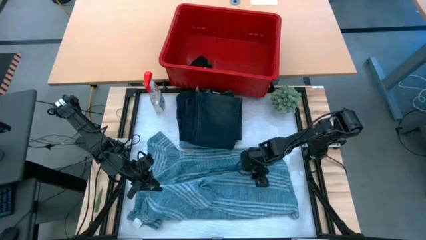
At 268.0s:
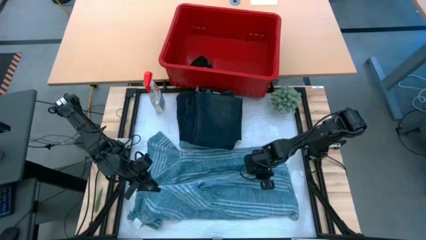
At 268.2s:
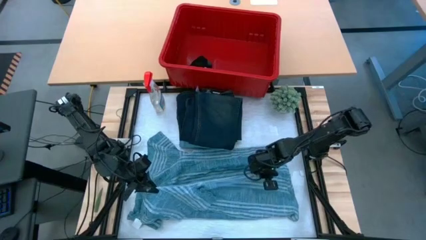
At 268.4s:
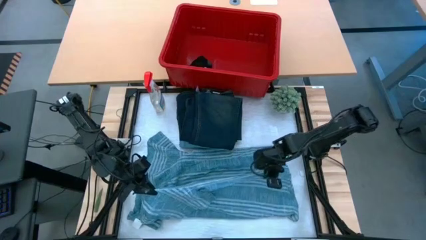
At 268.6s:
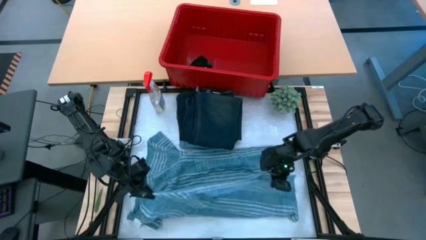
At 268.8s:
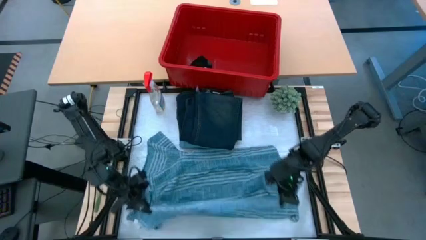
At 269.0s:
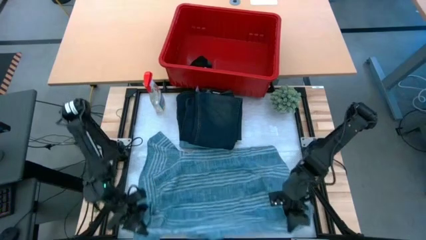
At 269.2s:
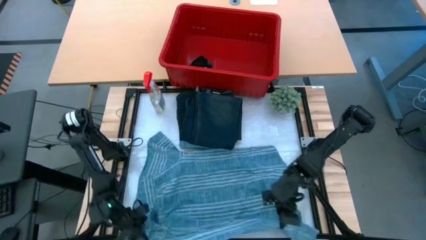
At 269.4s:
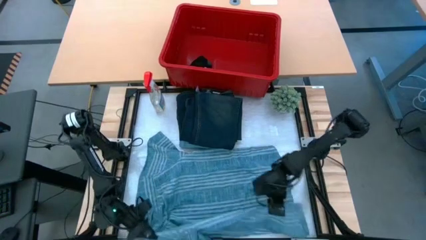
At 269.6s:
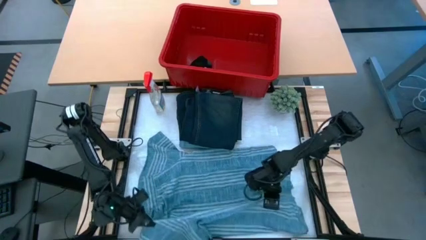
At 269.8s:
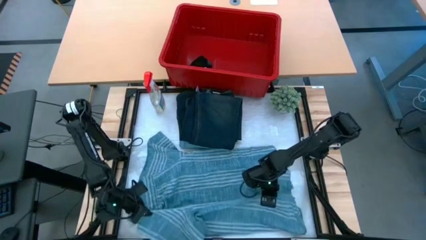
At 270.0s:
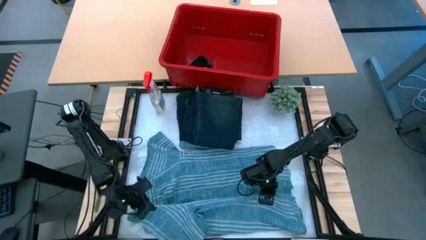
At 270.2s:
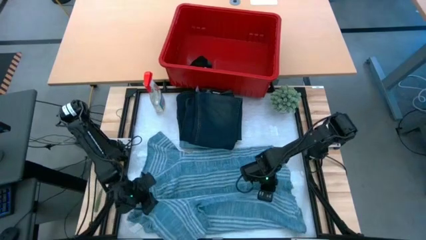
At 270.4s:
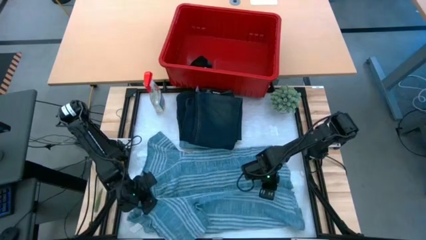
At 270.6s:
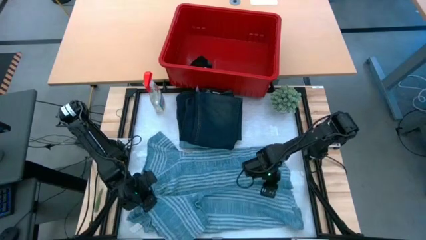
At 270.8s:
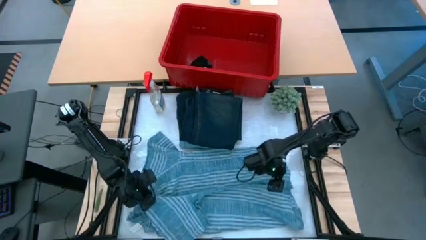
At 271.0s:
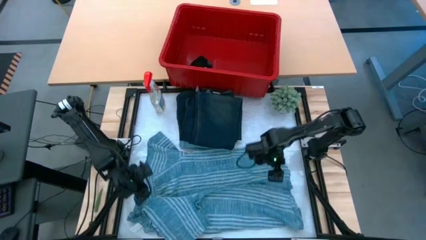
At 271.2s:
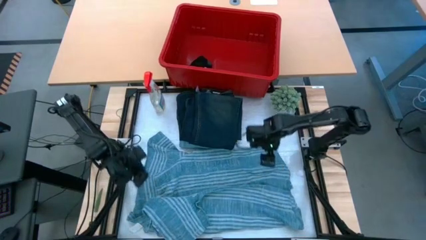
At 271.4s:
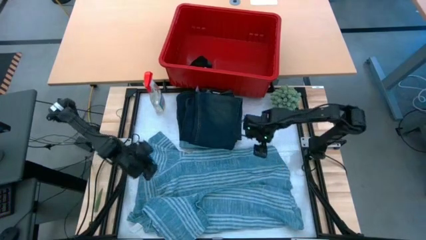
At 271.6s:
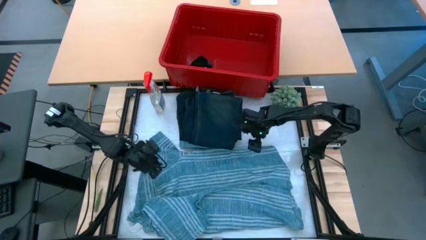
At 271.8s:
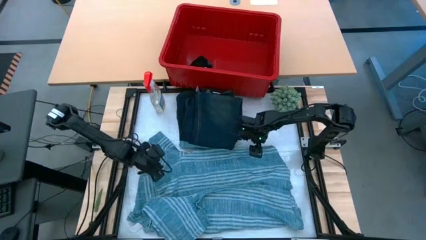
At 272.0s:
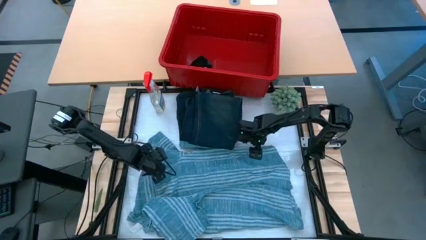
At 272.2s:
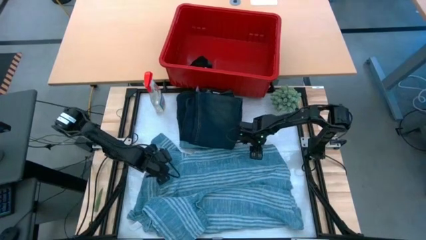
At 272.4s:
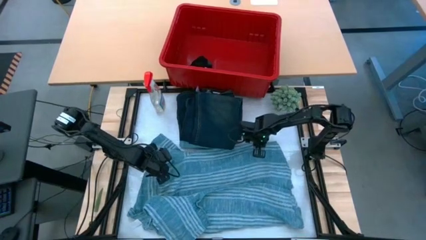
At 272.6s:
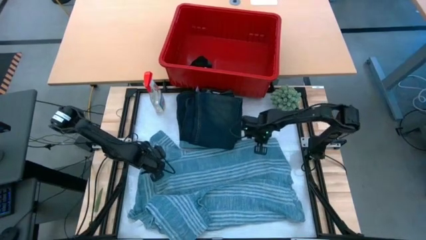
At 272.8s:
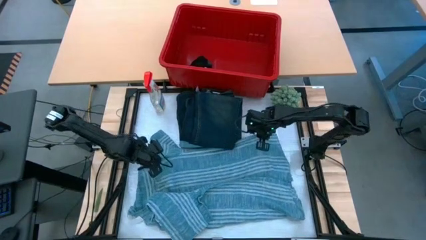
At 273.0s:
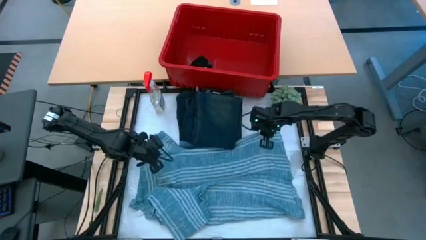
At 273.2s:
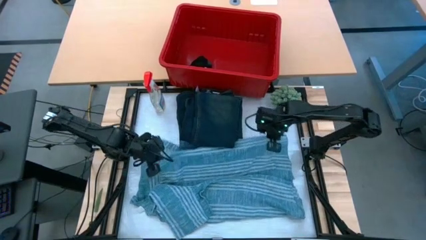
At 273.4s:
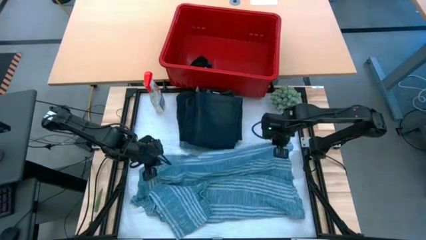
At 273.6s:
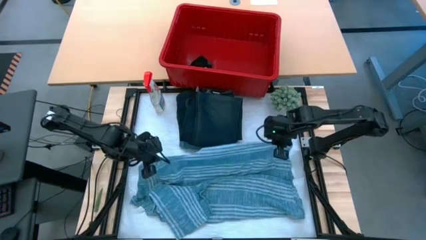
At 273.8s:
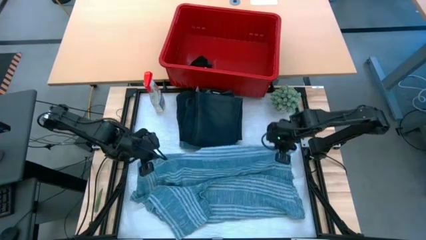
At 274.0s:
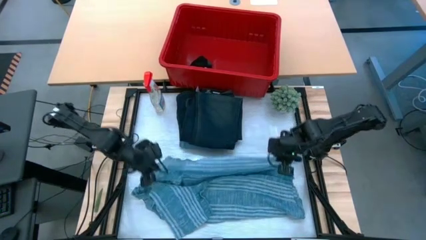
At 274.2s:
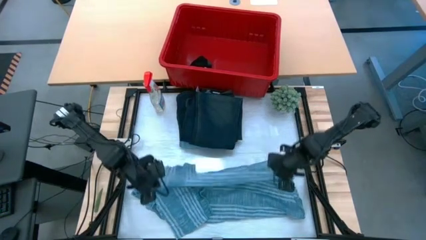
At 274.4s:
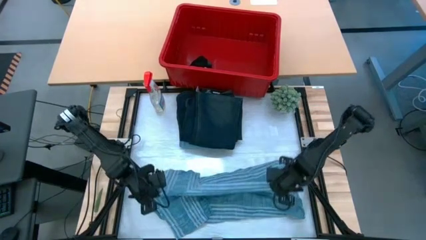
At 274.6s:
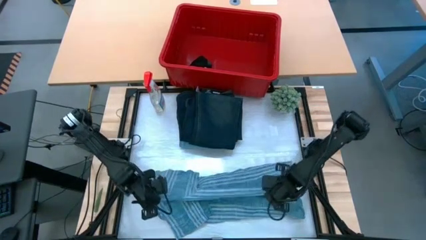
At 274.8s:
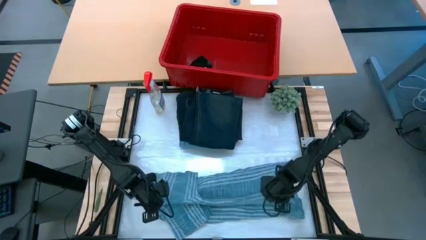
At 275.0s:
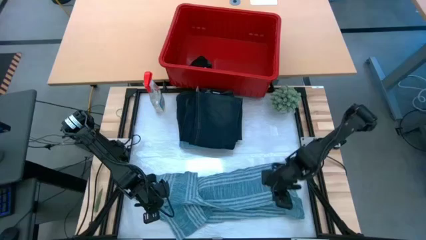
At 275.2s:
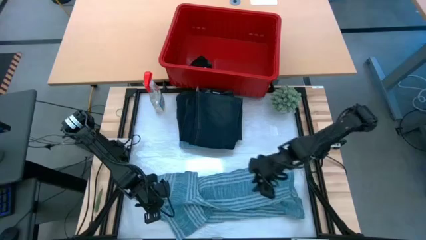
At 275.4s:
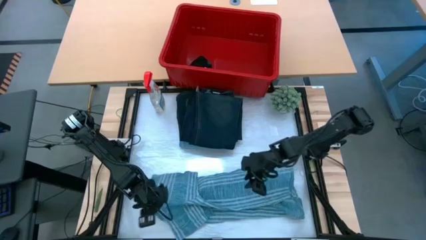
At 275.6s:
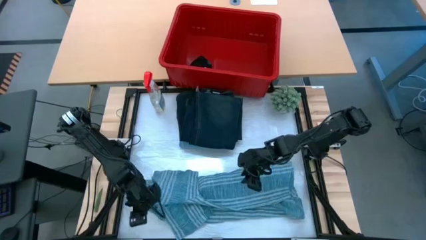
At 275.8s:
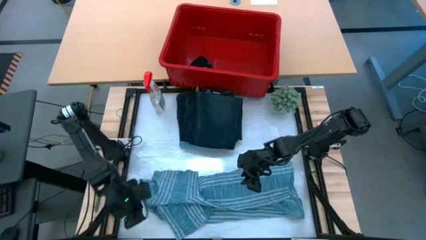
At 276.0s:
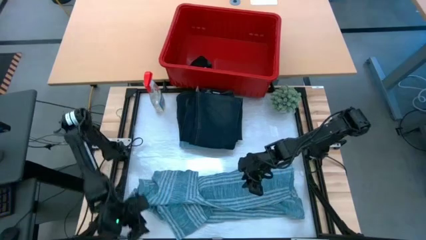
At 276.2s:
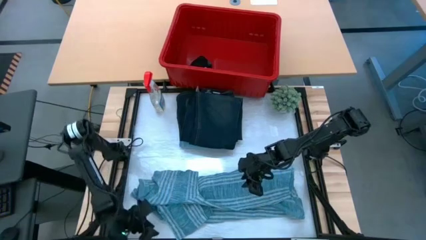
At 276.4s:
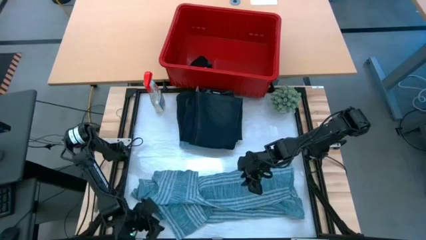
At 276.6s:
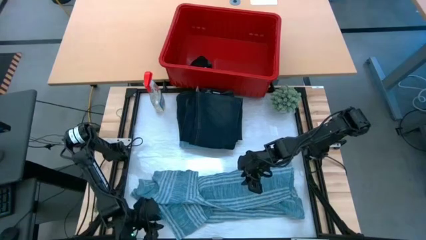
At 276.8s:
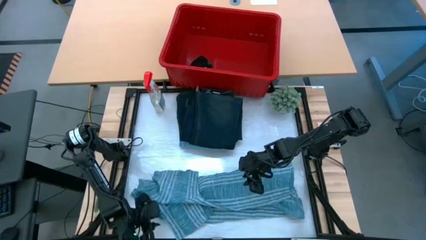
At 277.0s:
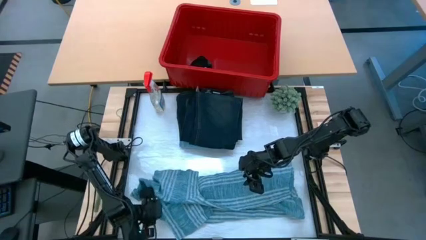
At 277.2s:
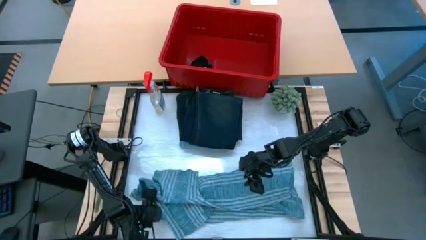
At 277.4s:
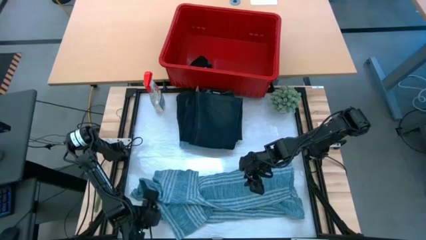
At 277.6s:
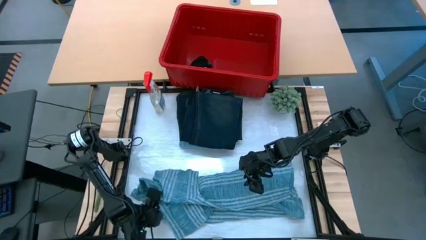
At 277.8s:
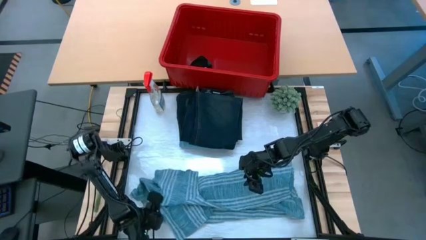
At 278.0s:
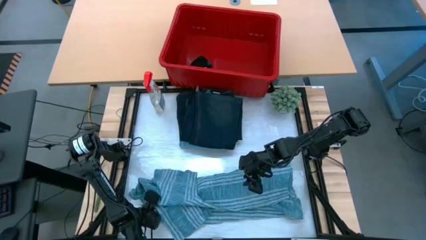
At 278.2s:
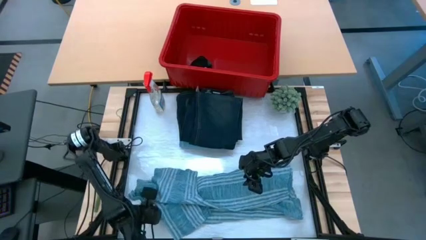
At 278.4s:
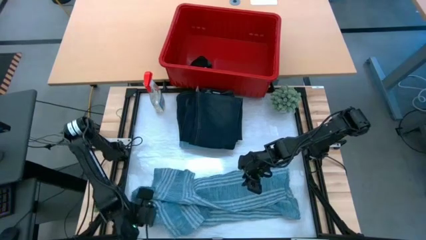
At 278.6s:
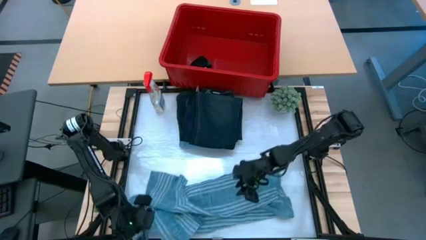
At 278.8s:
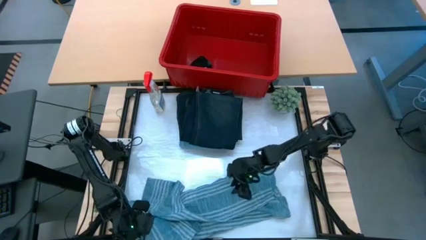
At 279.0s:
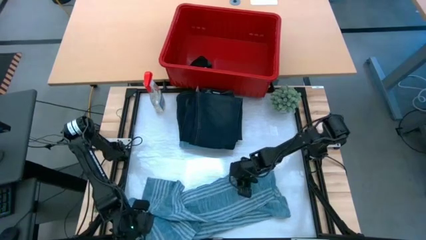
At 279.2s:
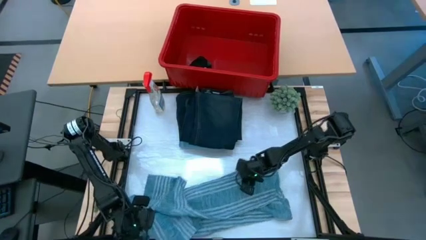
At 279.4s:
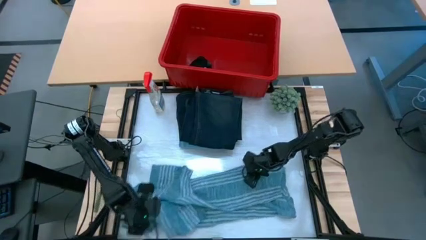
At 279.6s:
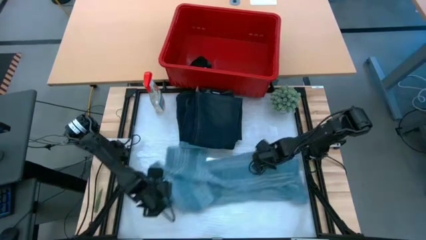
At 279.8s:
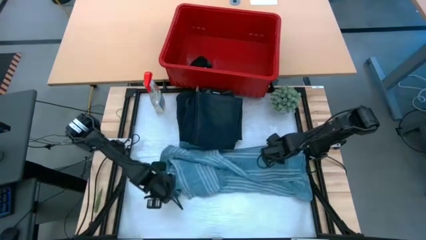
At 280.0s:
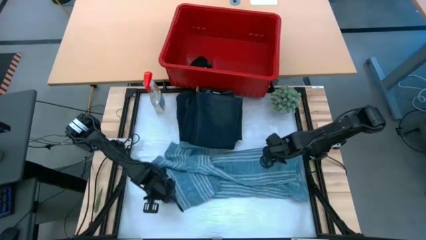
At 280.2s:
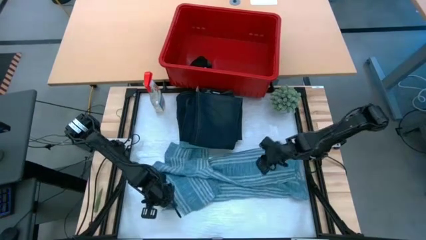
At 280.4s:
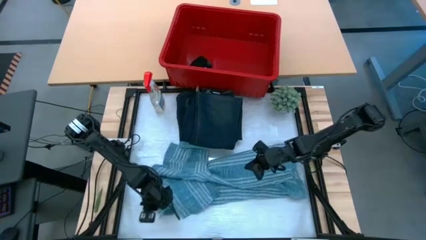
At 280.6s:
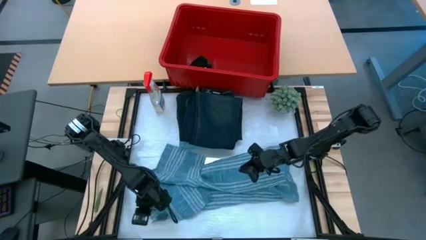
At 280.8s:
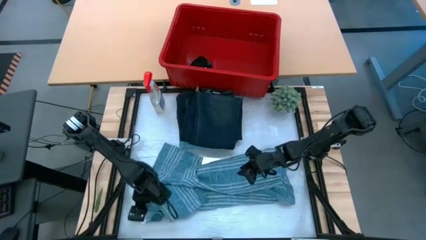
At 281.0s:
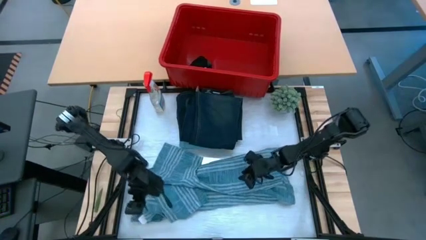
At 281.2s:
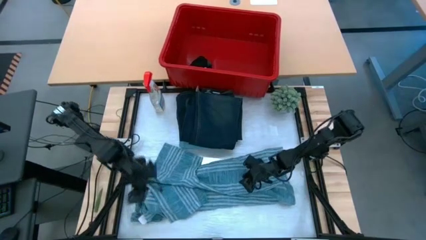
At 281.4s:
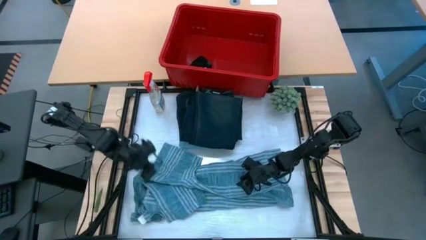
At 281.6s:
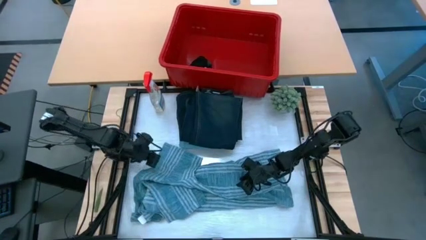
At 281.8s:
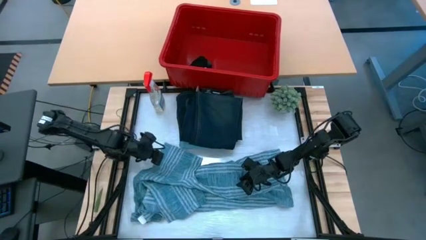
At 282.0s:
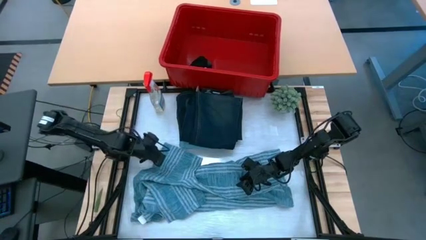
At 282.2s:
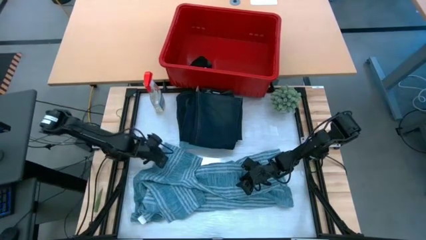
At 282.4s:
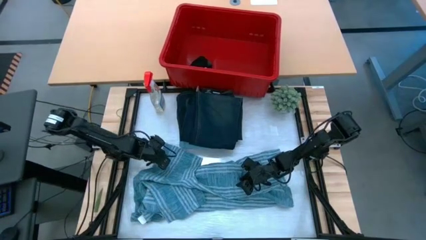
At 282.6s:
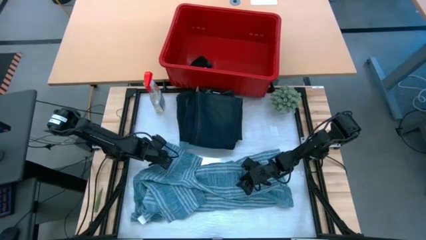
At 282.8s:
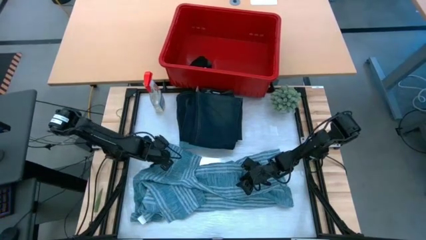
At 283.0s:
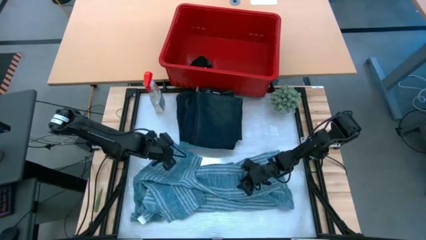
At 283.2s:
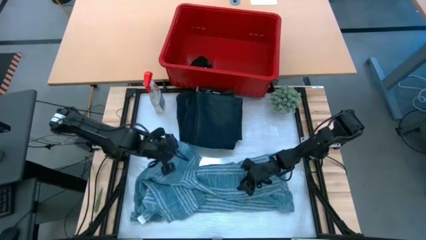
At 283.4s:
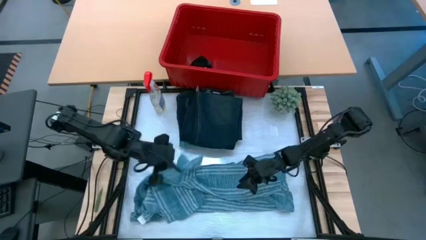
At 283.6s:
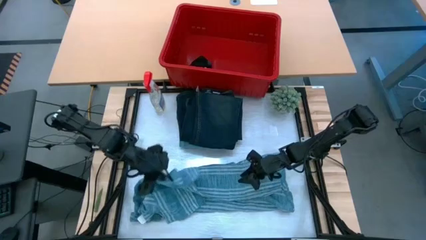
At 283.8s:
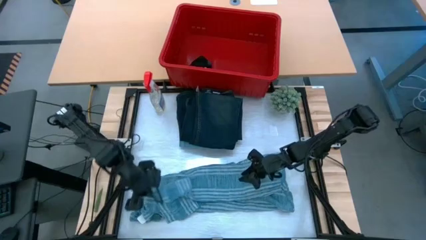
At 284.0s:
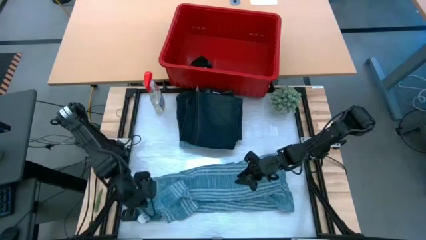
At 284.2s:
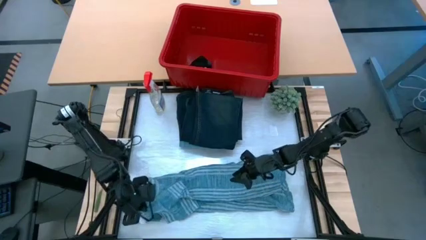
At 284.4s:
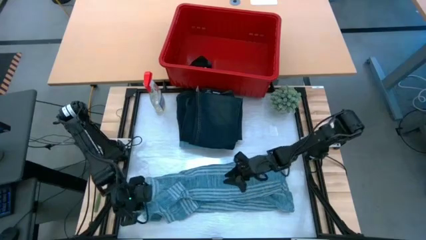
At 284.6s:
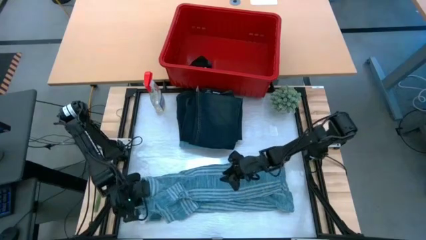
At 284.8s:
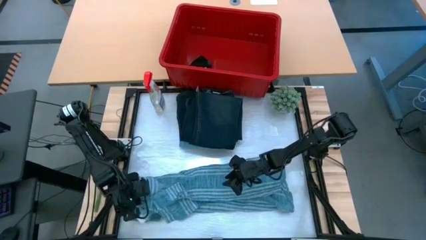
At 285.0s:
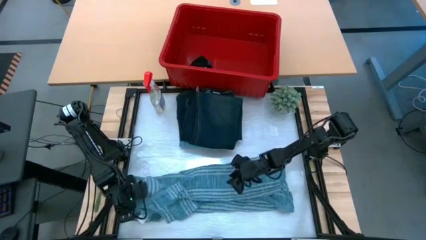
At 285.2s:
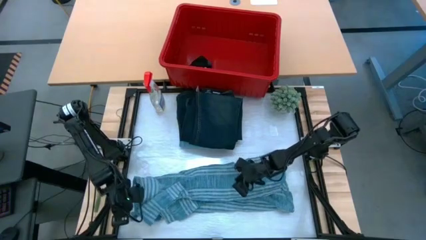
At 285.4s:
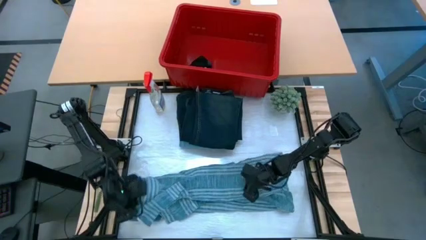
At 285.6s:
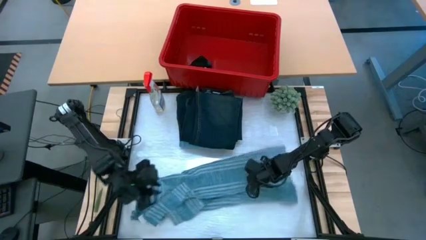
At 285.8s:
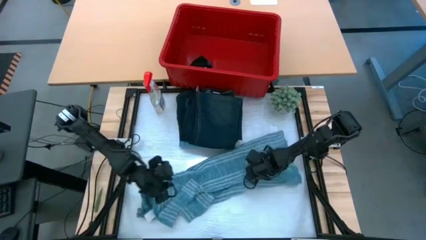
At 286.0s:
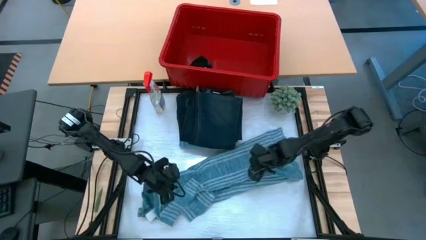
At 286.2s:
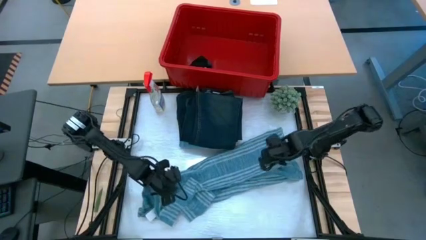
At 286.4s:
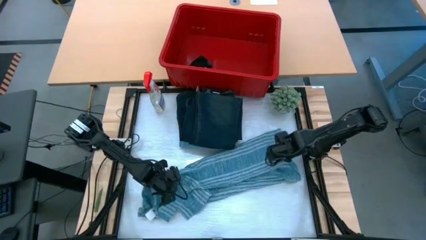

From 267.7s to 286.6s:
Task: Fold Laundry from Bin
Fold the blue long sleeve on the table
